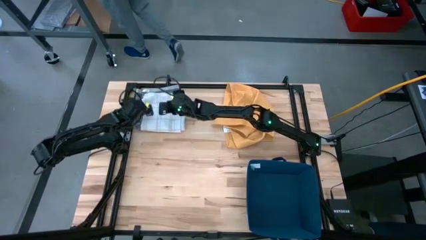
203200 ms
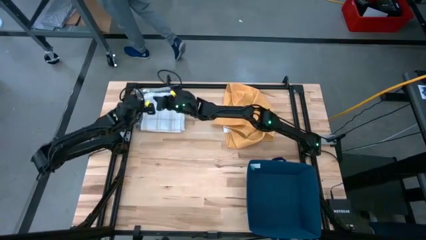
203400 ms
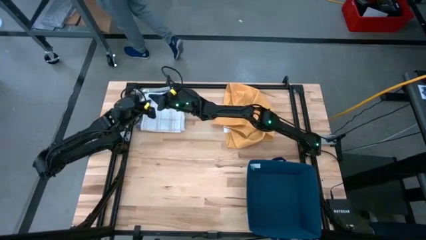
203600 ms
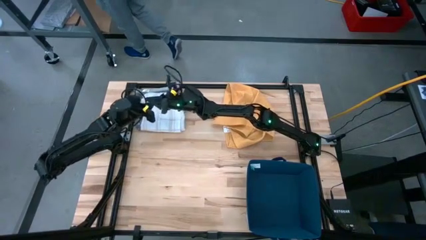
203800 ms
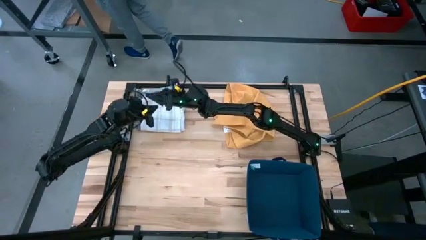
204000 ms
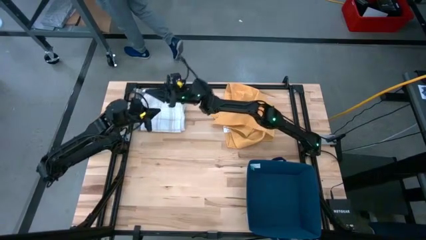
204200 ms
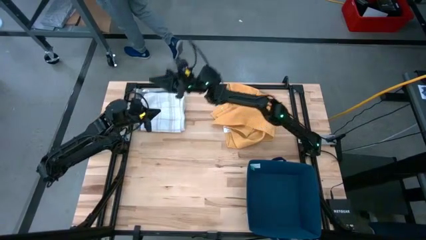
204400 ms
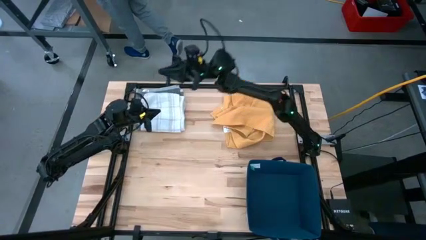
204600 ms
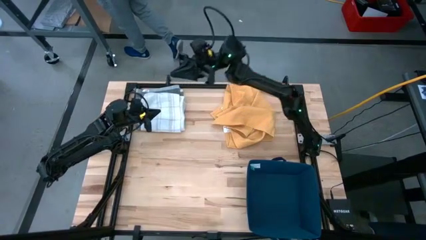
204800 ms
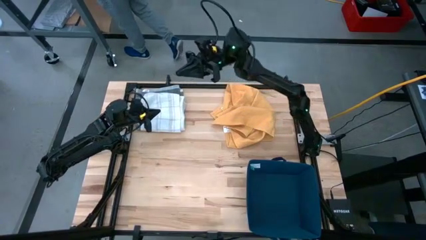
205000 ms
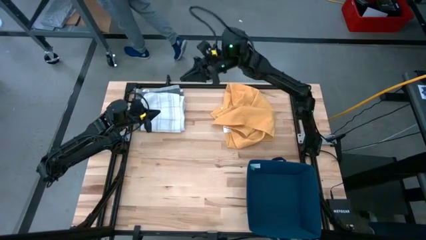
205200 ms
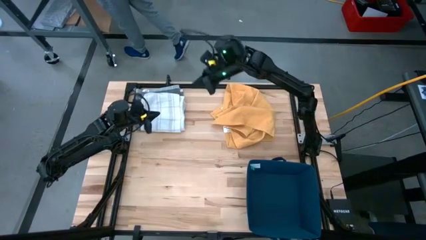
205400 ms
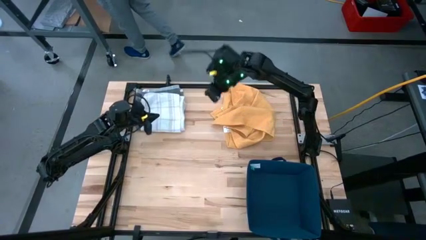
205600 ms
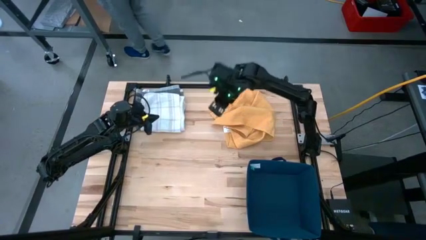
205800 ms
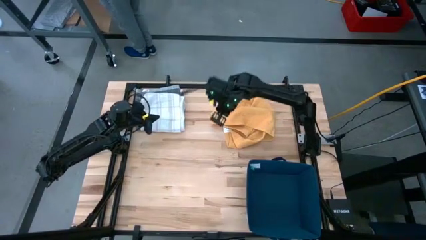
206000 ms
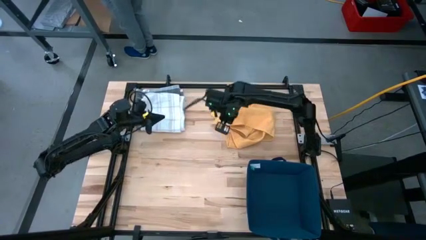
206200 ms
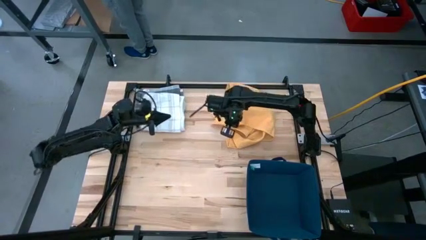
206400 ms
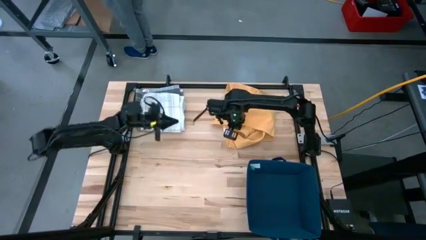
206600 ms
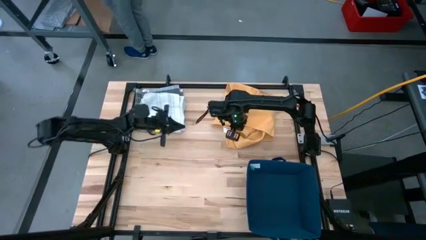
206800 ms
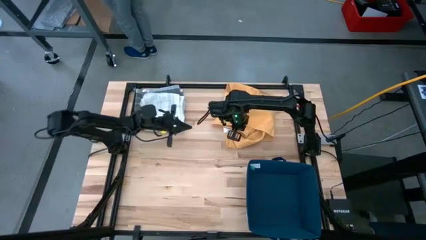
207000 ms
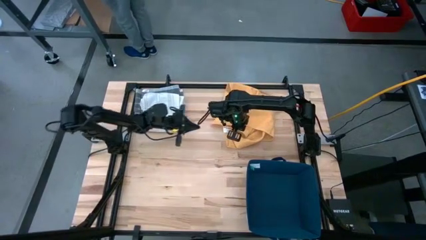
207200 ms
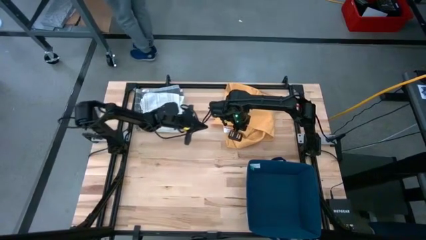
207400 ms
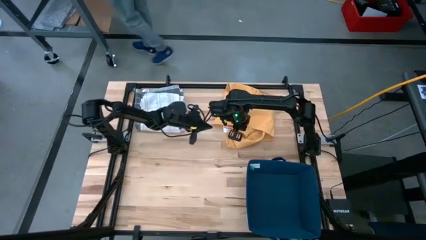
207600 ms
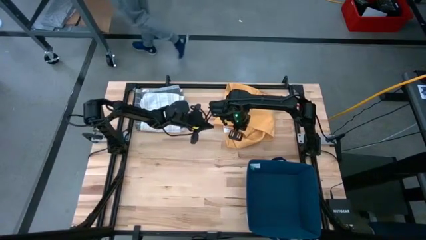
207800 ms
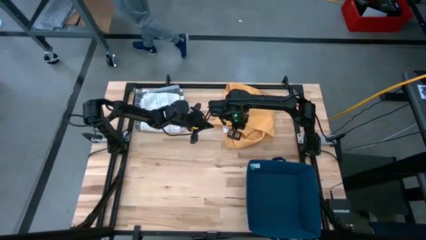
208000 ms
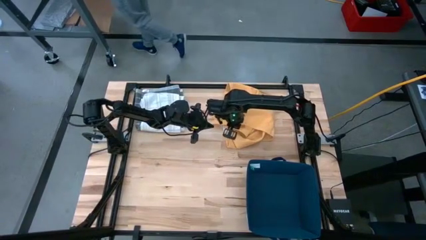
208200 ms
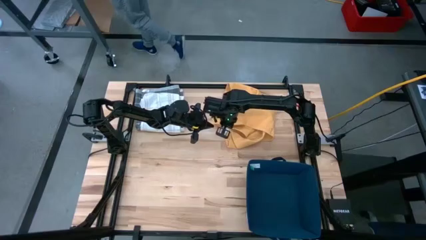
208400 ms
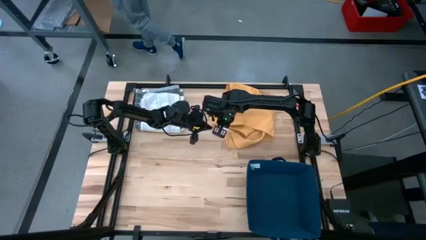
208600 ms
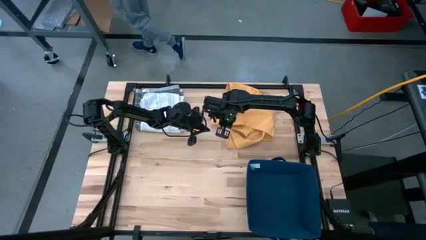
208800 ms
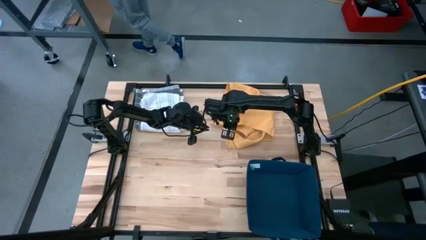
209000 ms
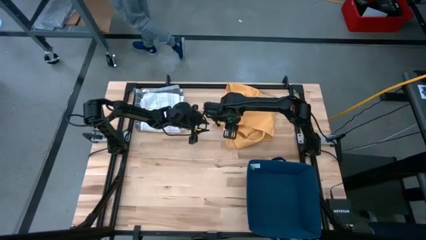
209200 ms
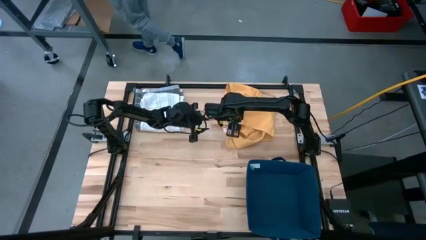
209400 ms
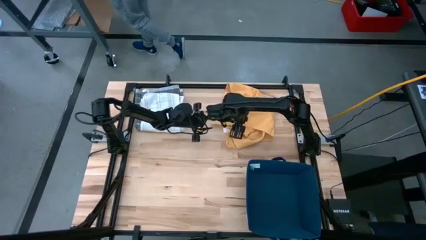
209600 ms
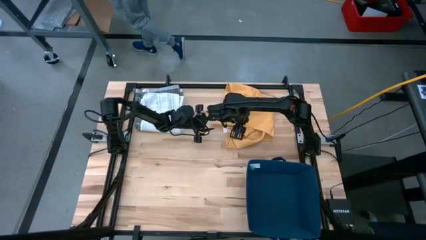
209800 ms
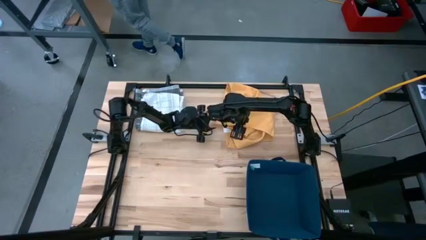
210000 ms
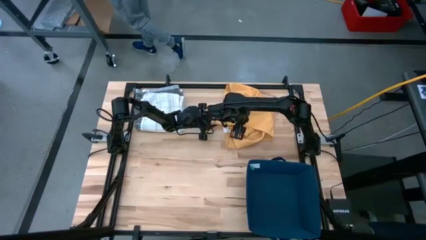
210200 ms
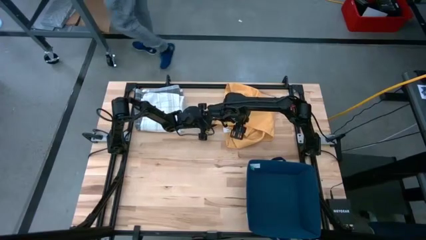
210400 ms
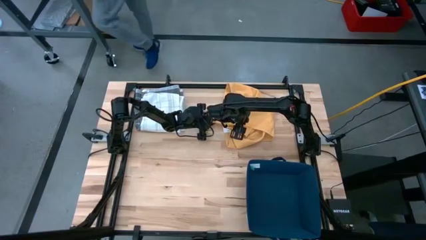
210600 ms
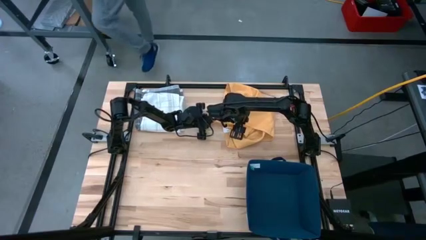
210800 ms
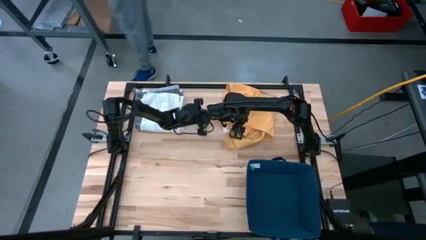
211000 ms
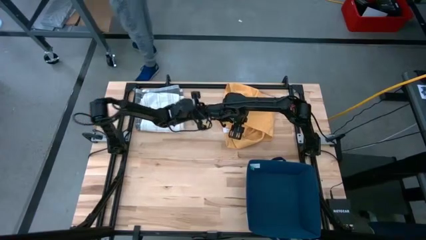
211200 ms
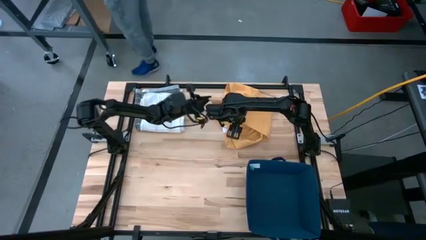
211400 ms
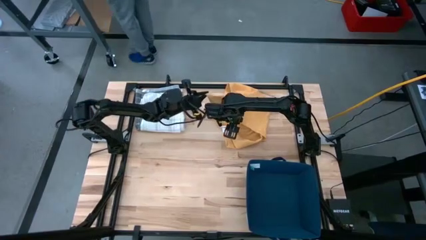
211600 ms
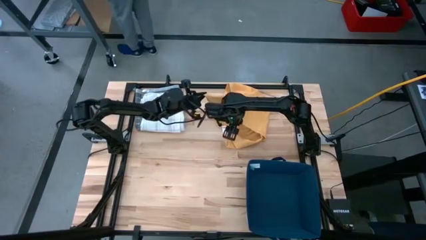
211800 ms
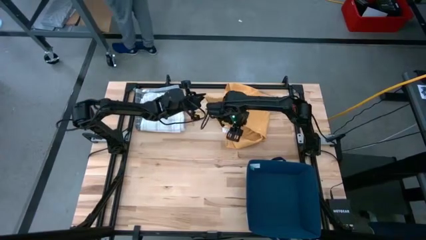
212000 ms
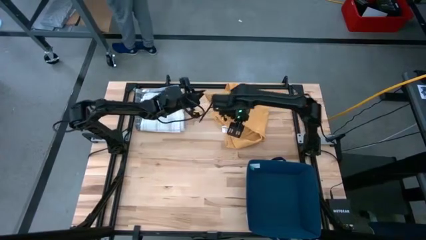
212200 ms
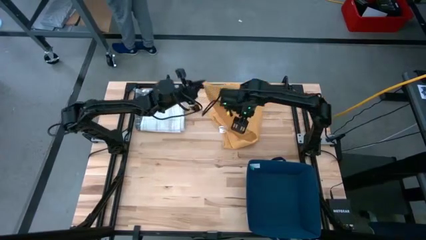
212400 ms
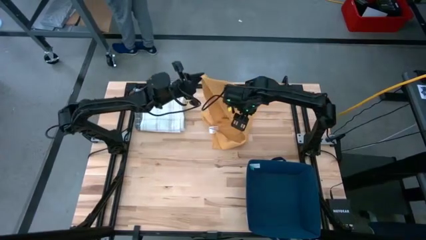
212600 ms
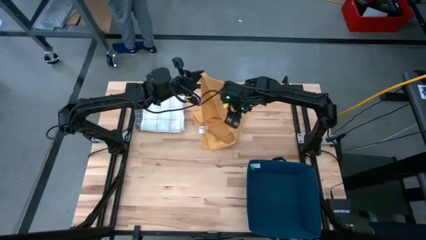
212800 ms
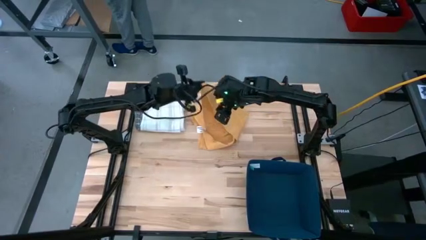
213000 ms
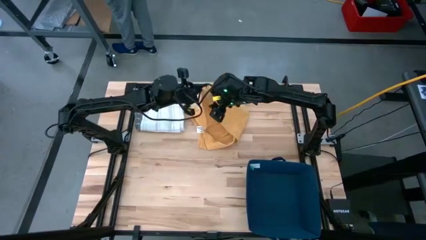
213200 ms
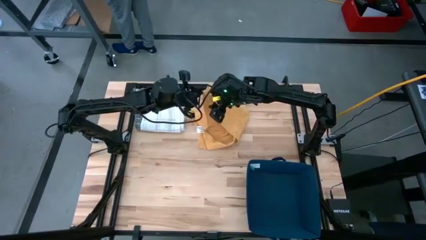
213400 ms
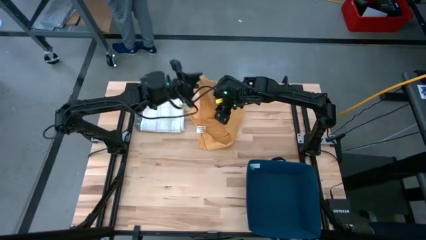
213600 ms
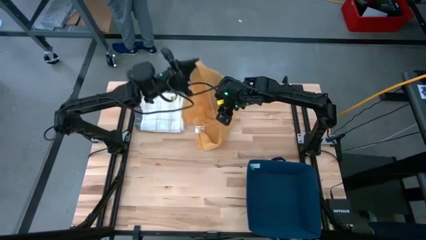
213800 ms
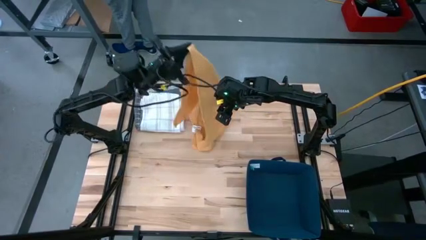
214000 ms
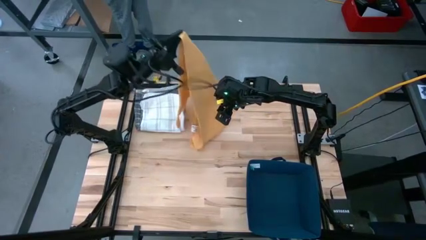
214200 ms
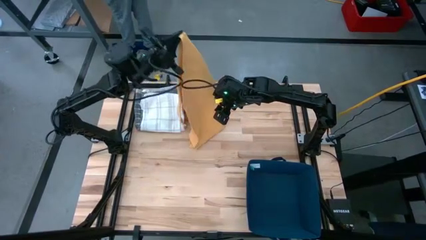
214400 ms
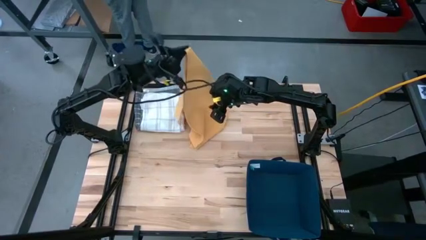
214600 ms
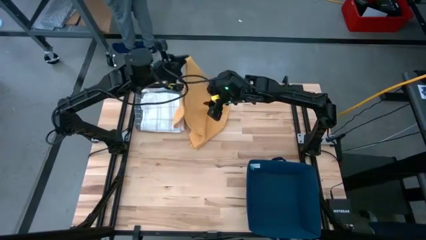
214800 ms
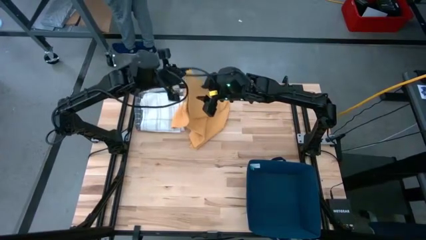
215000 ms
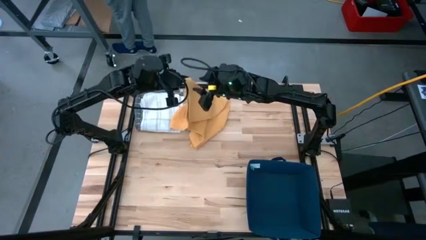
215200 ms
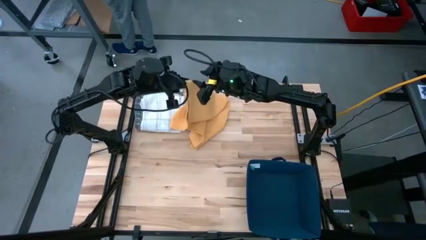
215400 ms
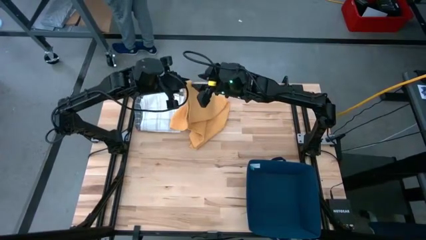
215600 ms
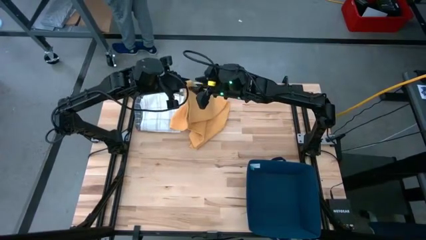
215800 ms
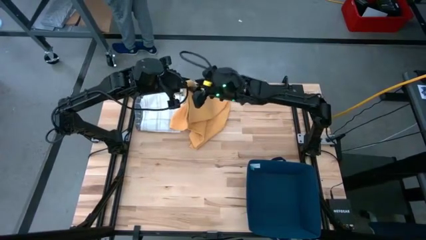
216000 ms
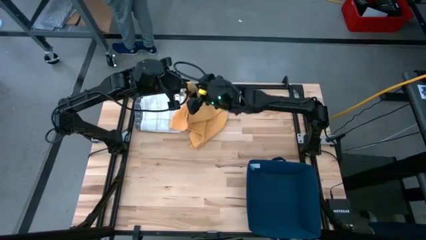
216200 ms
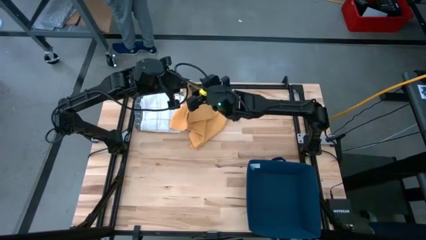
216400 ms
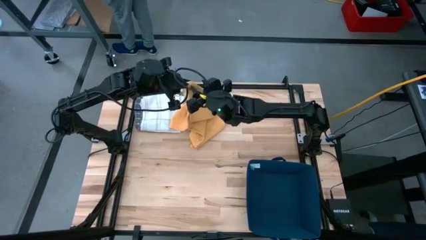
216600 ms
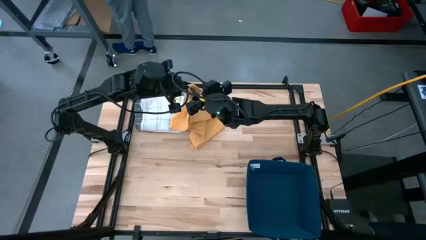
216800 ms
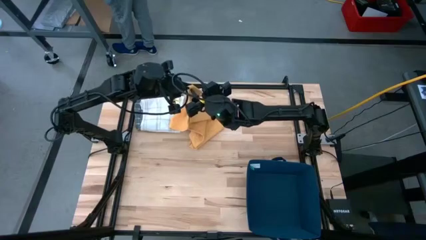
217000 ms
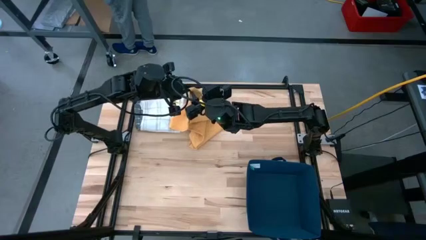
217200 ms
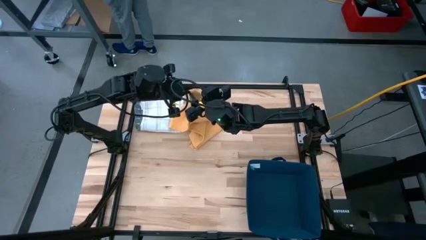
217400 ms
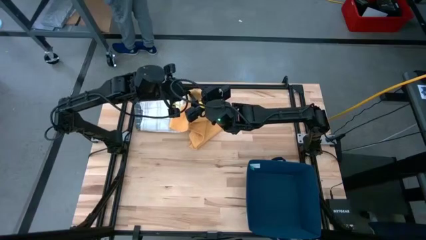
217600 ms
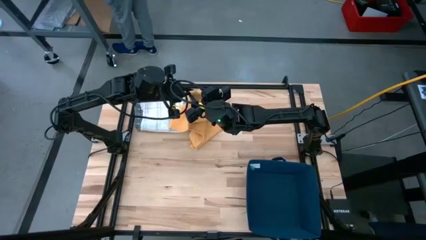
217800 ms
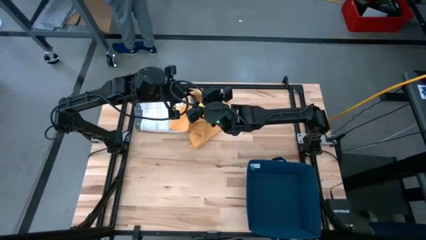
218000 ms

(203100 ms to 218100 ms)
Task: Fold towel
Fold the yellow towel

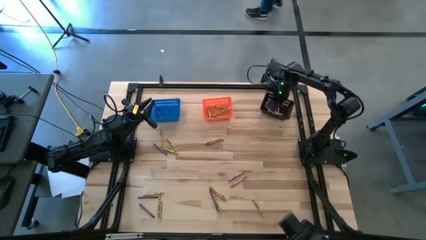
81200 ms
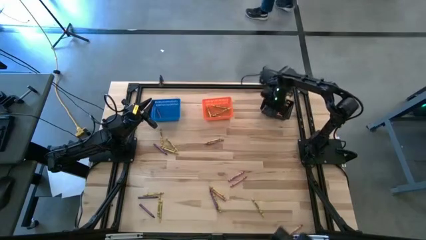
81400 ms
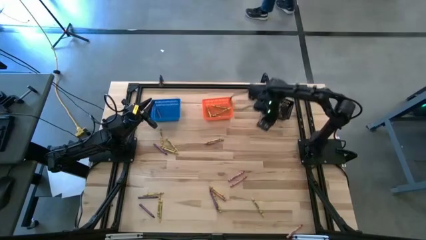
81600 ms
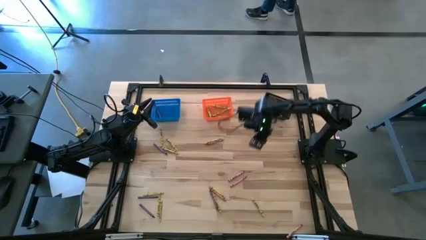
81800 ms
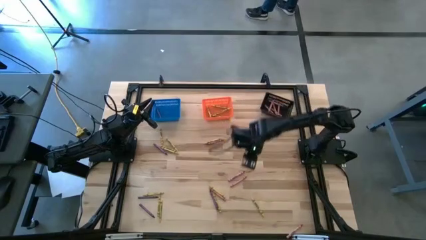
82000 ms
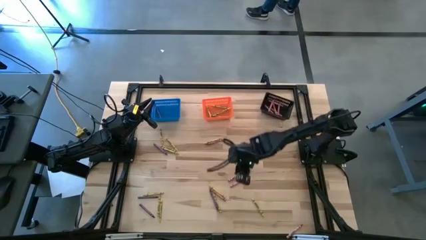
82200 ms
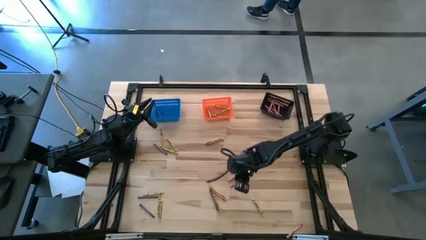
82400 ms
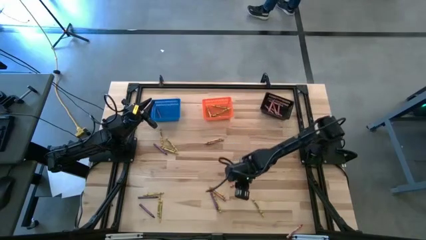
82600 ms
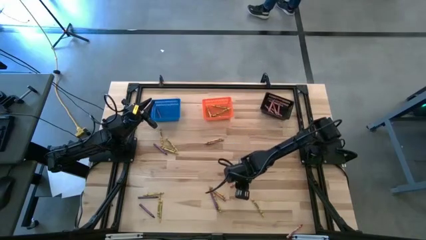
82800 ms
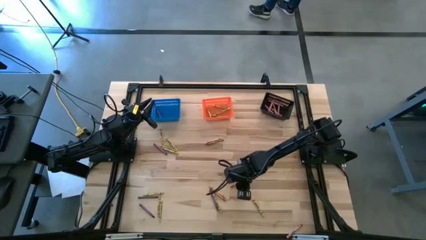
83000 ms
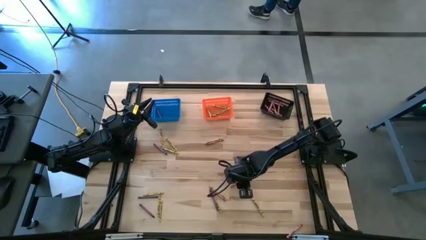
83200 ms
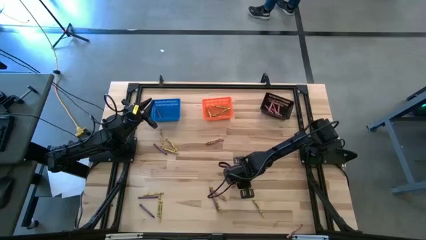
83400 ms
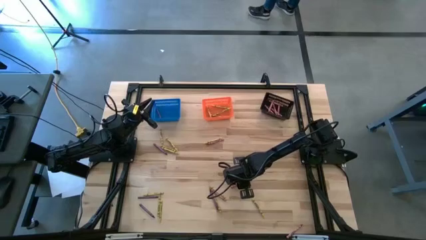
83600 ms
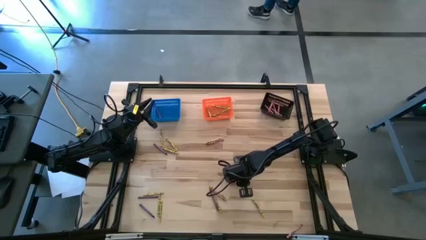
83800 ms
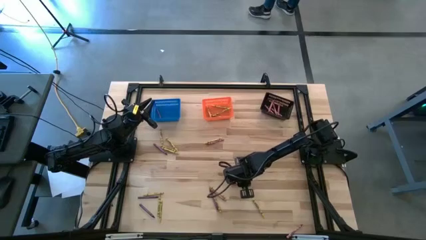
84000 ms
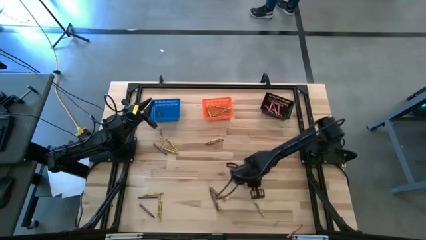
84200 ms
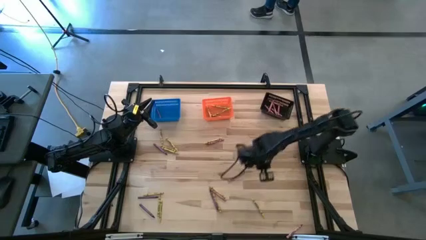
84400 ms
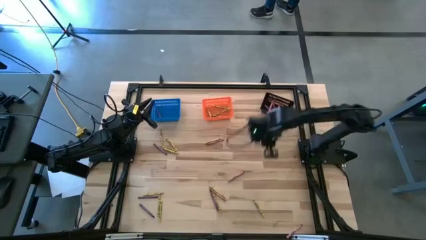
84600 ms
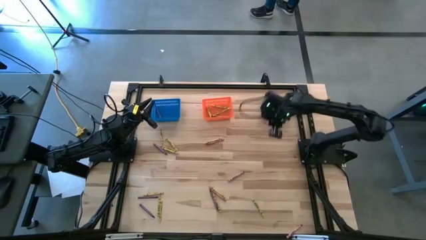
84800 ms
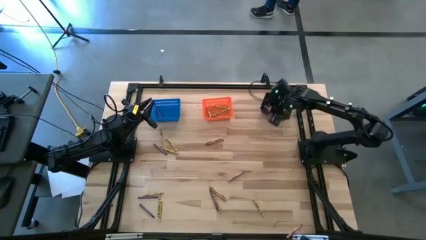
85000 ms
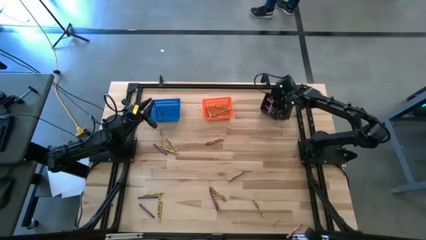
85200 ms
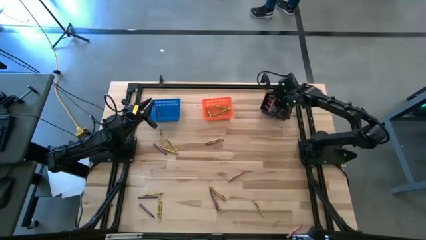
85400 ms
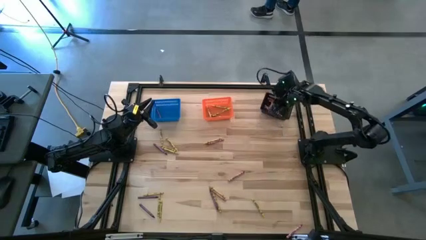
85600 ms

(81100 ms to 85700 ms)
Task: Sort crayons
Put the red crayon into the black bin
